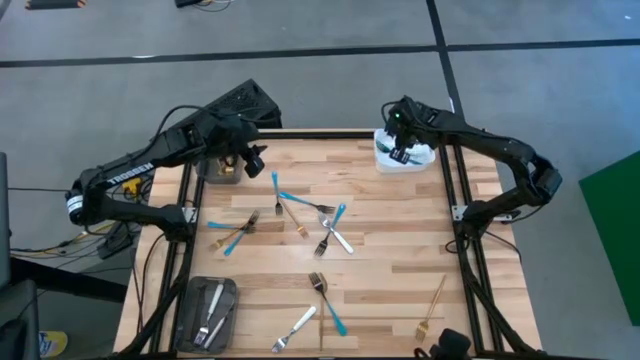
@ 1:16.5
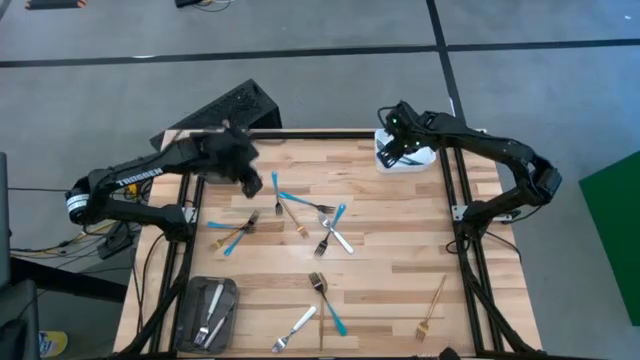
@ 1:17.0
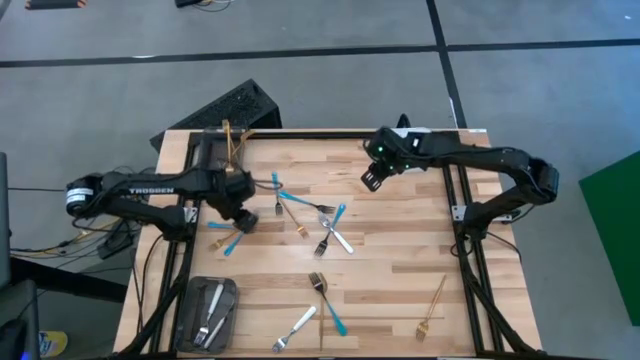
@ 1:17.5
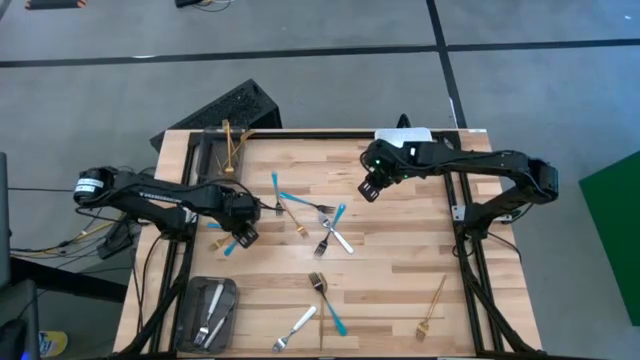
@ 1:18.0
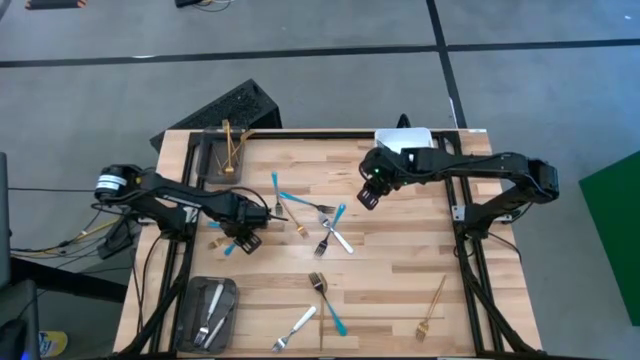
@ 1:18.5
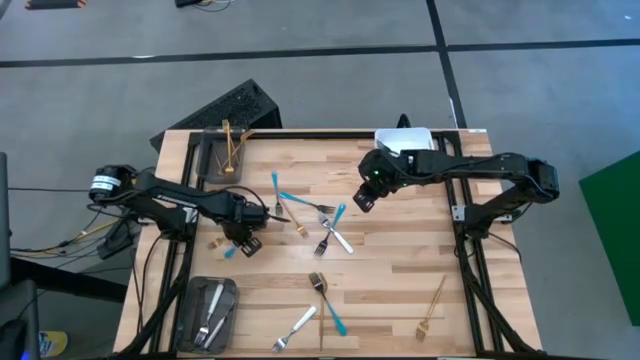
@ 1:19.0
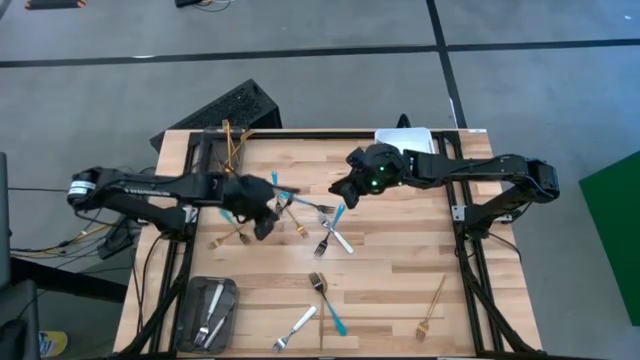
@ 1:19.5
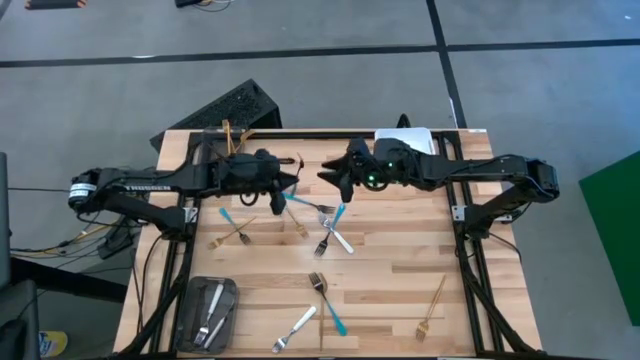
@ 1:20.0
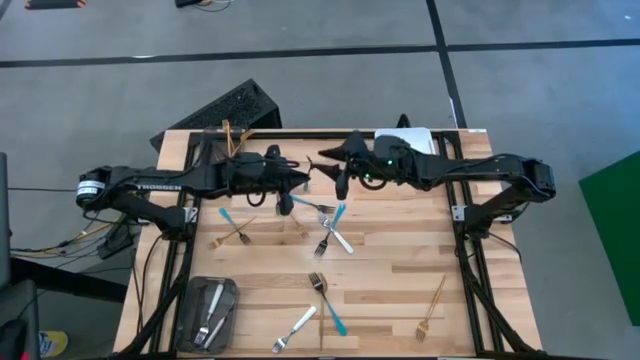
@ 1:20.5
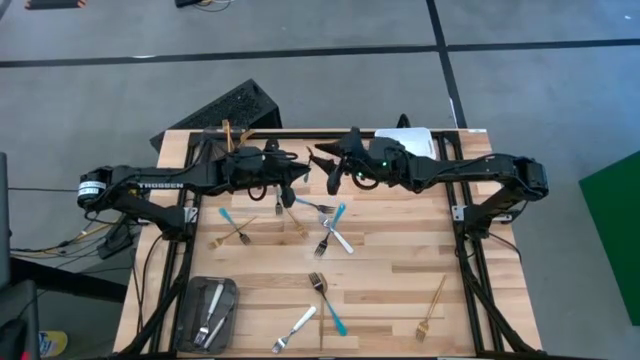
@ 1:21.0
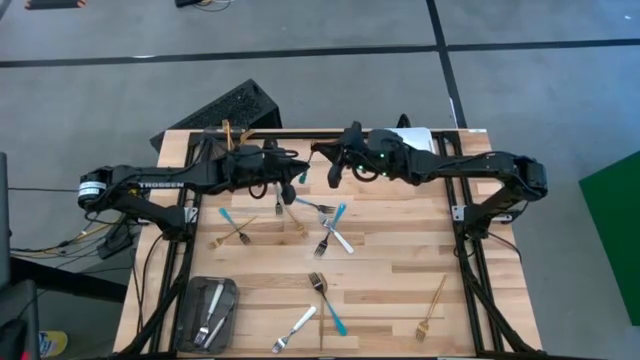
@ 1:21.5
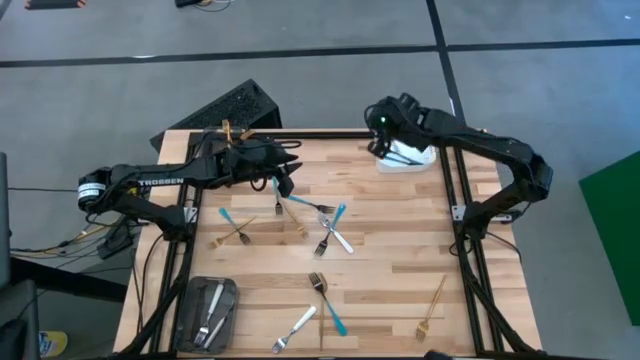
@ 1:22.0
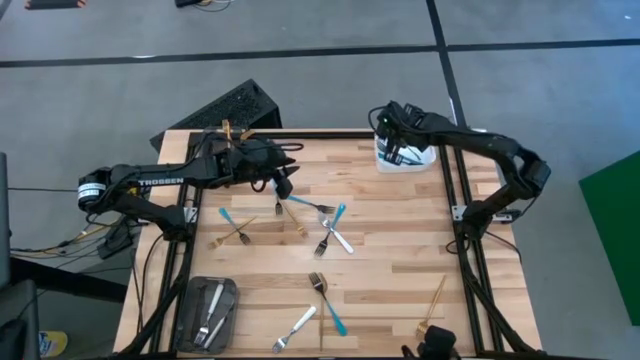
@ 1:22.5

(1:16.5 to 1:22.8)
Task: Sort silverware by color (type)
Put the blue fork into the white bin

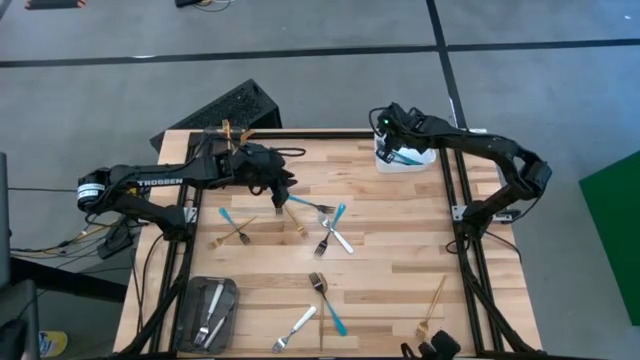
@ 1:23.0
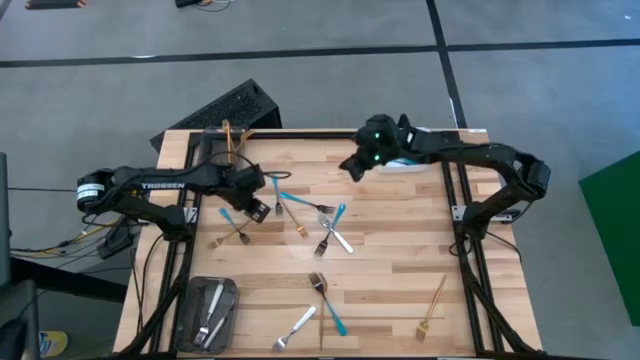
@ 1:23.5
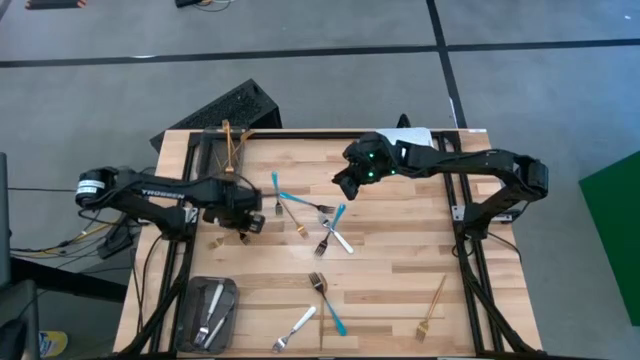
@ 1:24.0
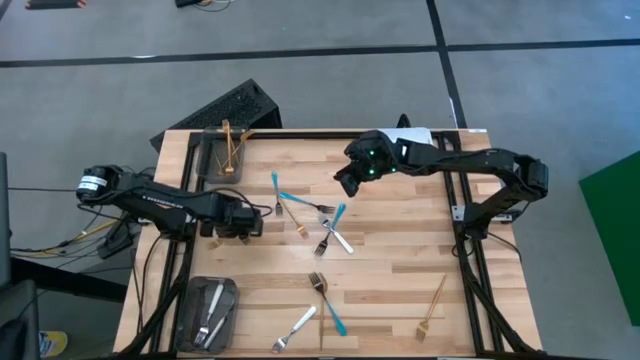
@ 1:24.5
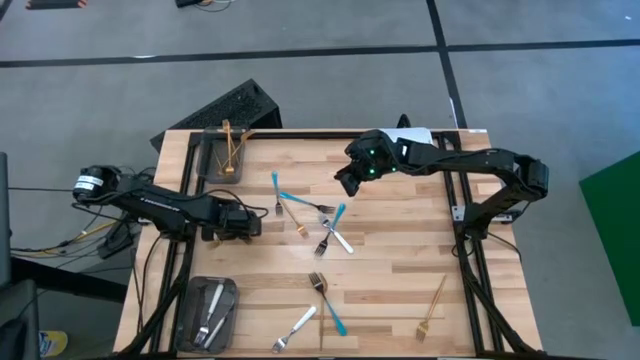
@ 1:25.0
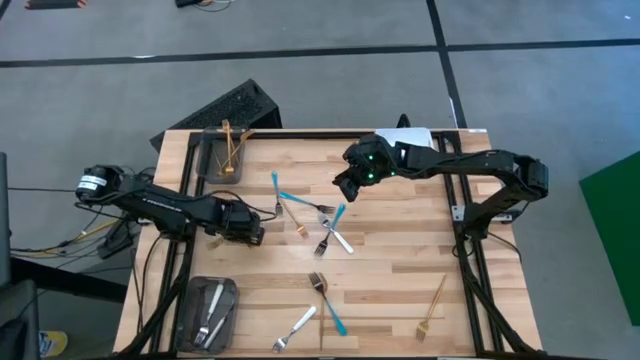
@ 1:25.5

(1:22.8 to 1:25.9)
Put the blue fork into the white bin

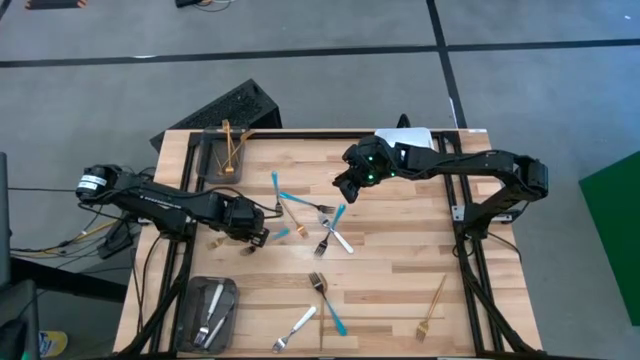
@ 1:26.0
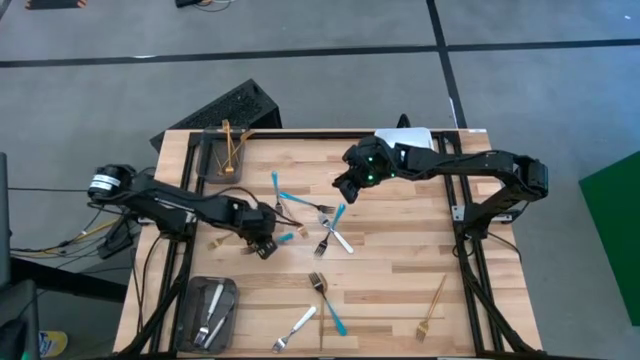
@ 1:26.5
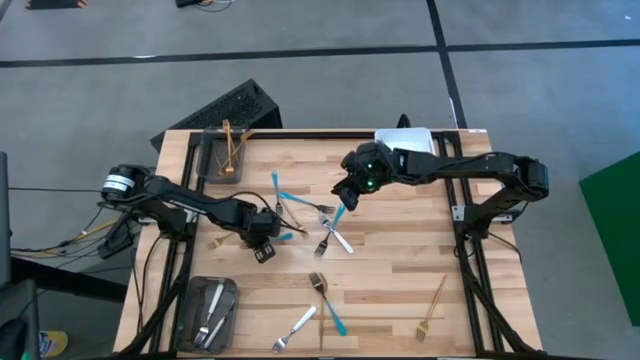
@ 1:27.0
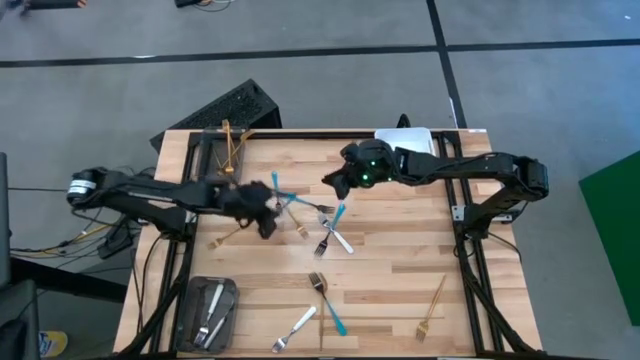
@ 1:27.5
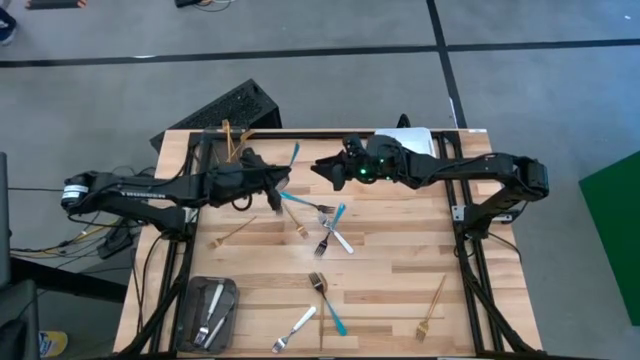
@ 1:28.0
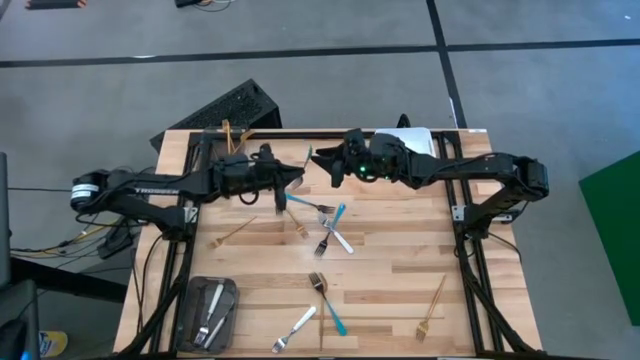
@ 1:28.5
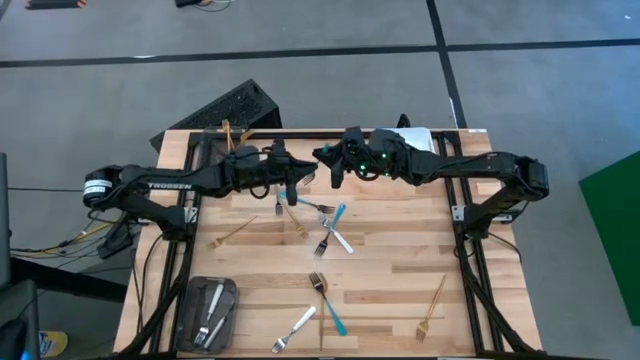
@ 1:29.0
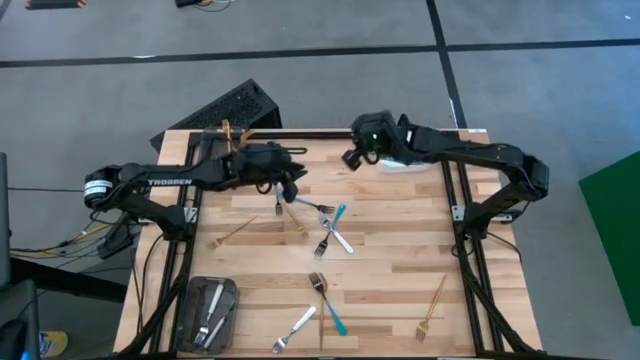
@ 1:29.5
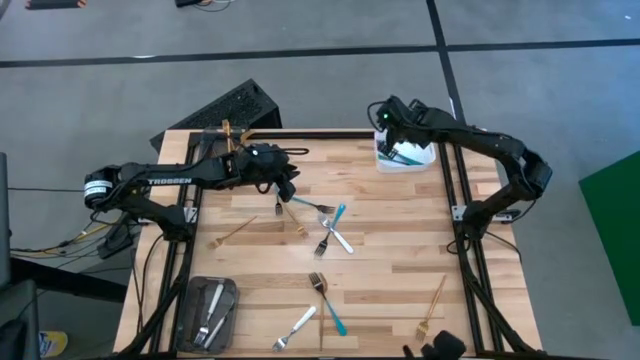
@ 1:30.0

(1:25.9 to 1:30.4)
Put the blue fork into the white bin

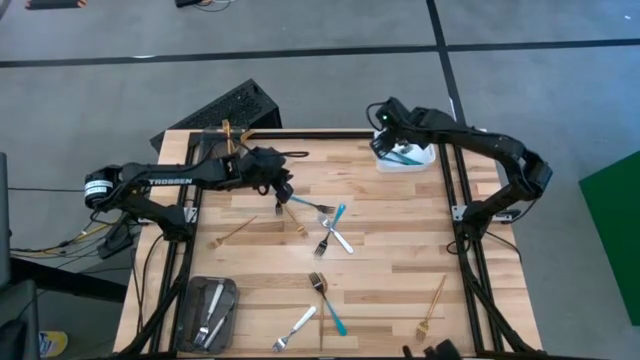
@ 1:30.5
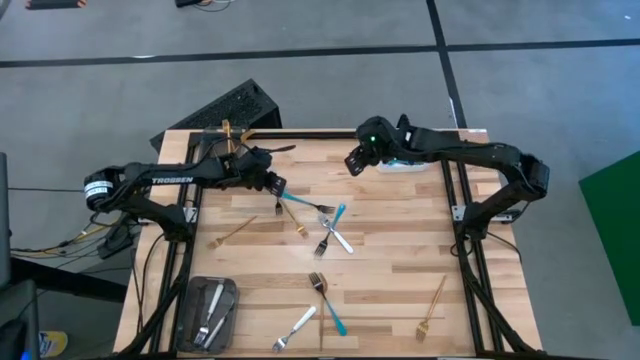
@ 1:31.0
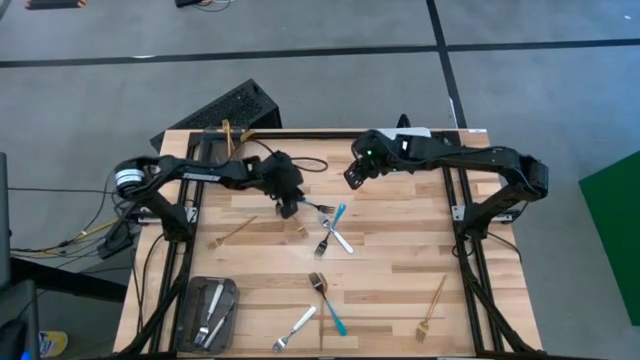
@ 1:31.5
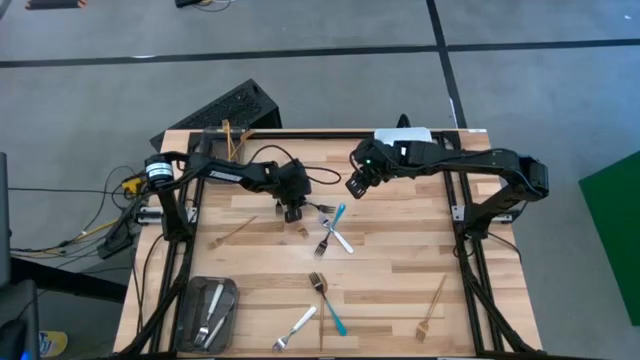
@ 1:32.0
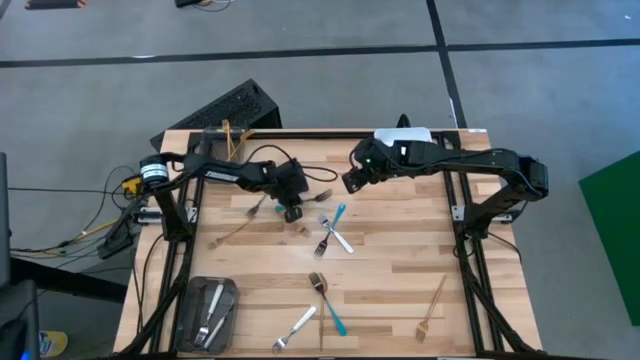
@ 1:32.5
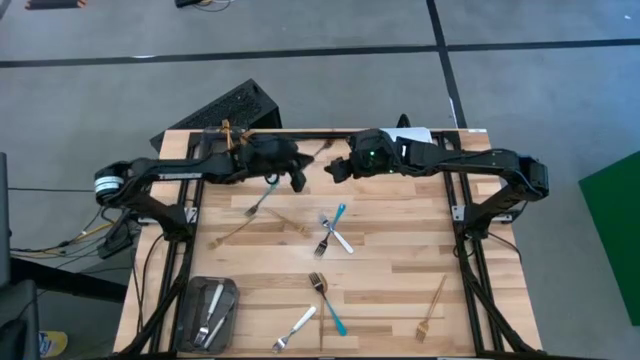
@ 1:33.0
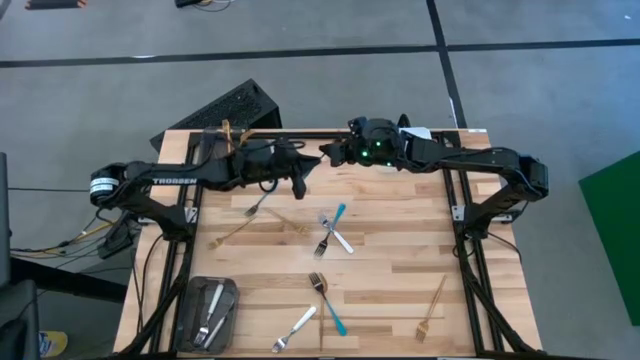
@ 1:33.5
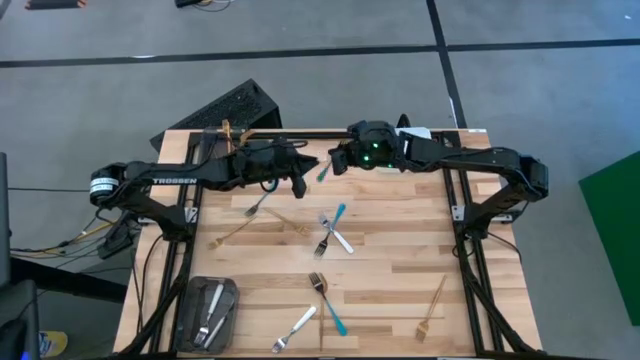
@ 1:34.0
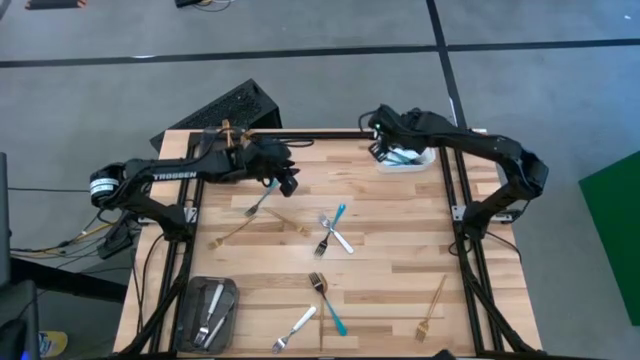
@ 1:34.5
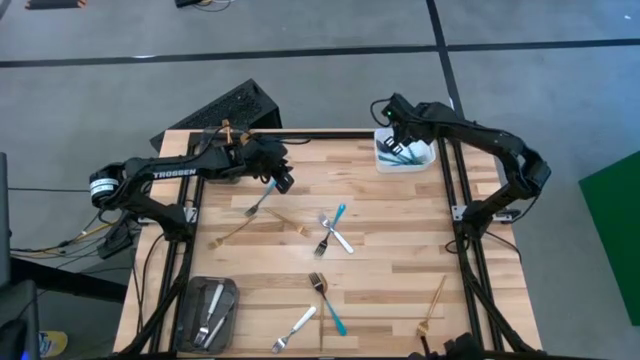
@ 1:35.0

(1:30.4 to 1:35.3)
Put the blue fork into the white bin

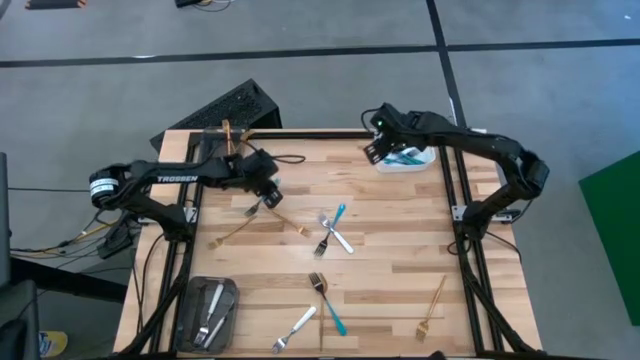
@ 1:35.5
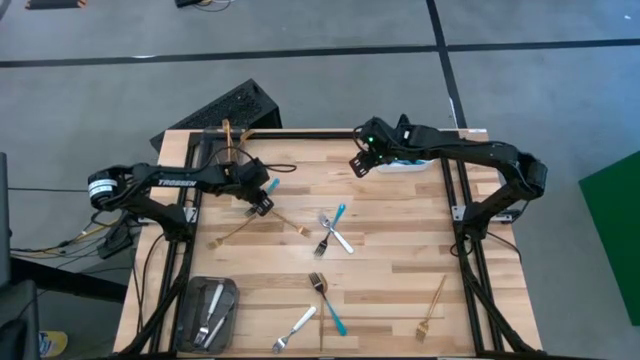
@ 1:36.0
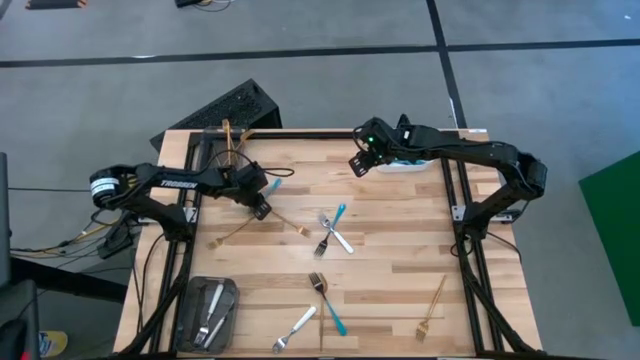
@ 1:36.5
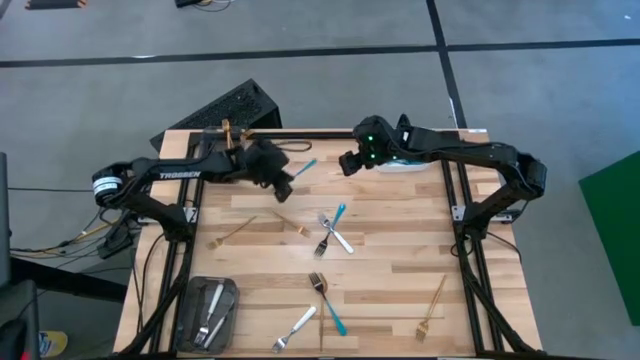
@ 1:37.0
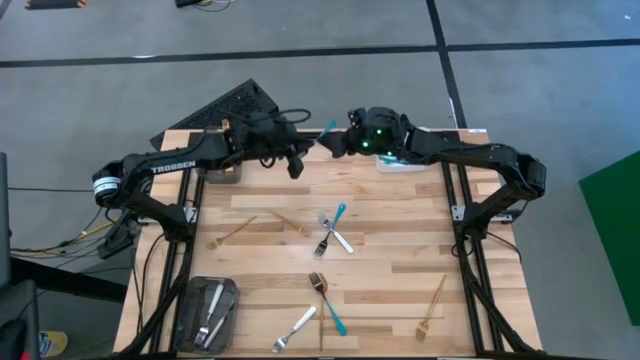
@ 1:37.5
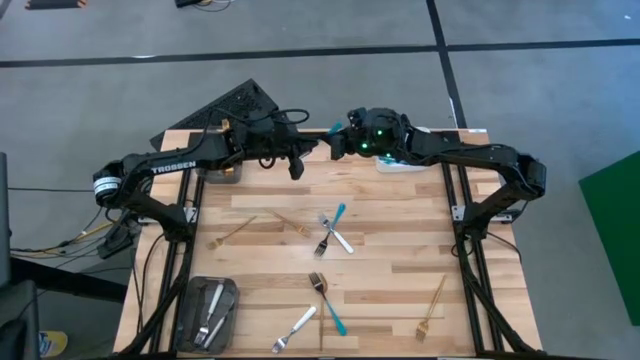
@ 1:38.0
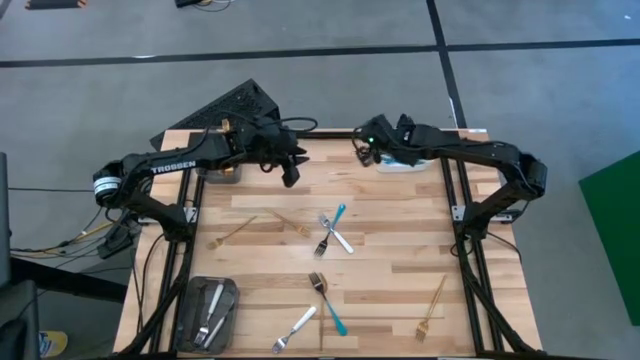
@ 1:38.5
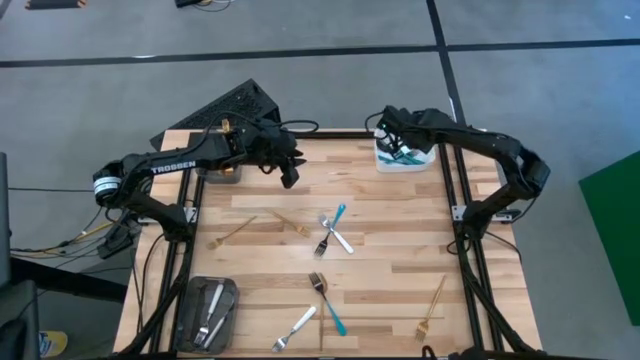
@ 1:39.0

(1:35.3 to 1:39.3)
Put the blue fork into the white bin
